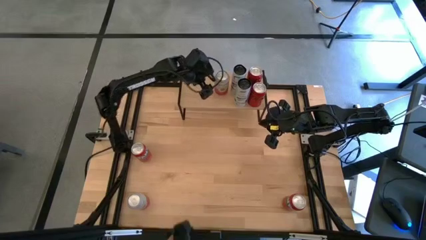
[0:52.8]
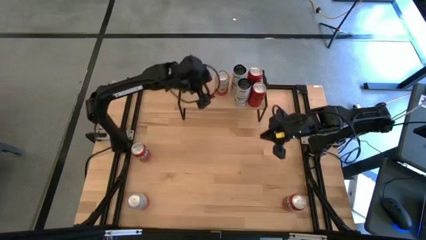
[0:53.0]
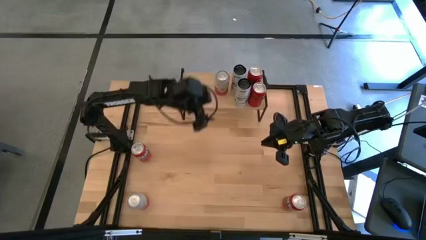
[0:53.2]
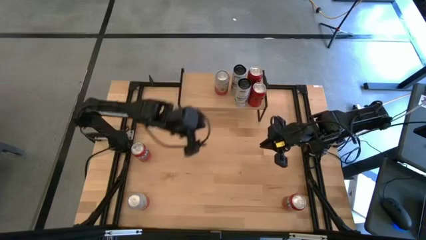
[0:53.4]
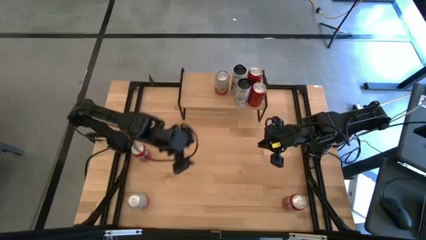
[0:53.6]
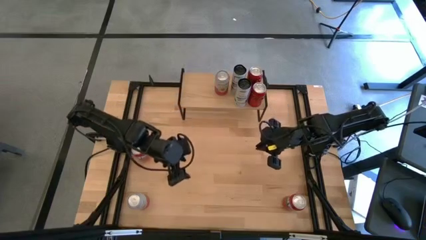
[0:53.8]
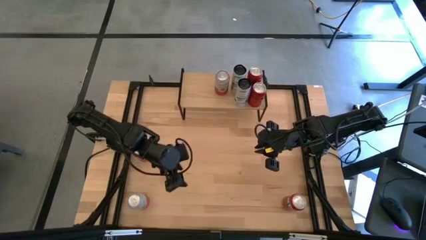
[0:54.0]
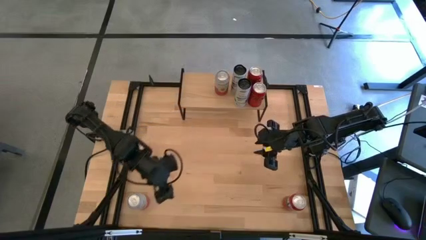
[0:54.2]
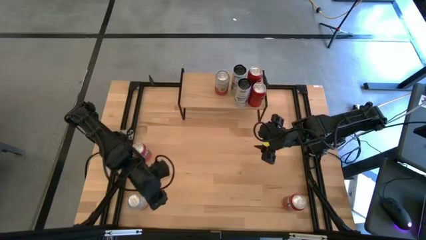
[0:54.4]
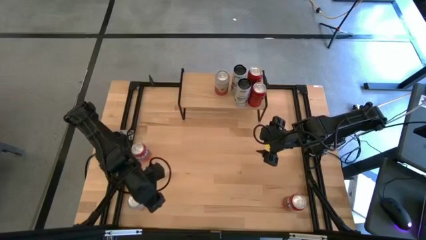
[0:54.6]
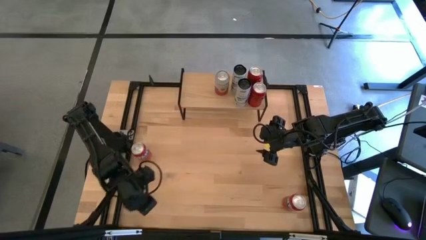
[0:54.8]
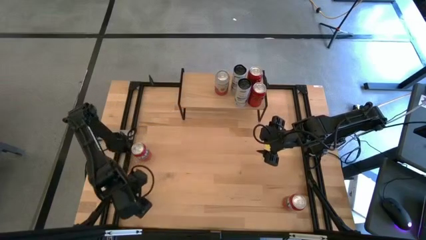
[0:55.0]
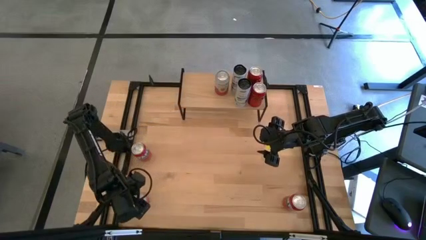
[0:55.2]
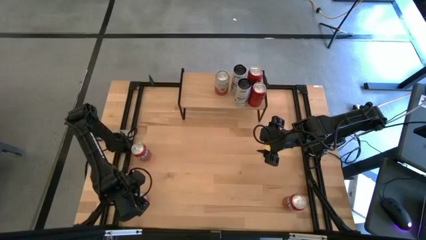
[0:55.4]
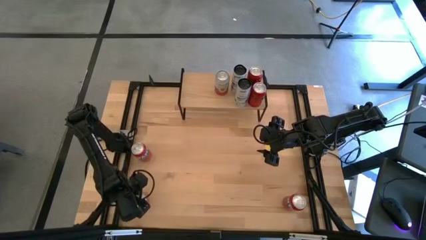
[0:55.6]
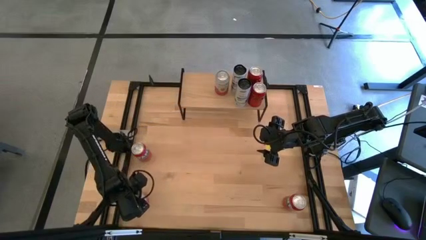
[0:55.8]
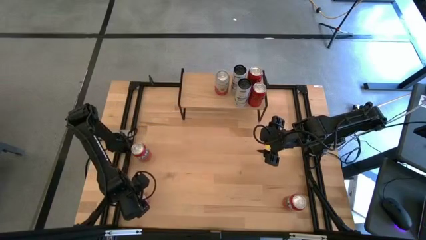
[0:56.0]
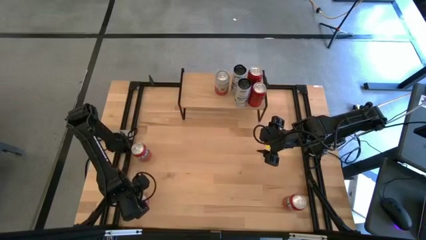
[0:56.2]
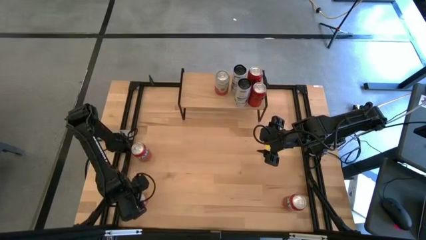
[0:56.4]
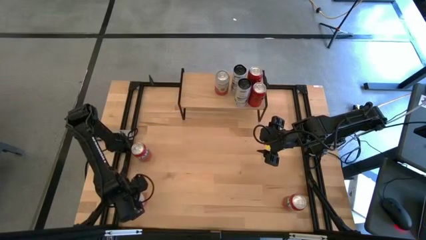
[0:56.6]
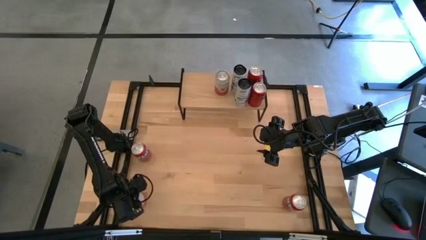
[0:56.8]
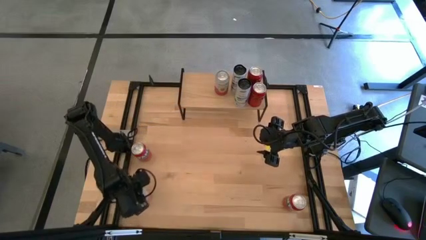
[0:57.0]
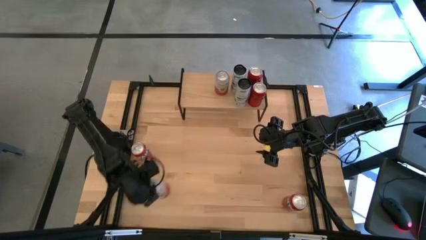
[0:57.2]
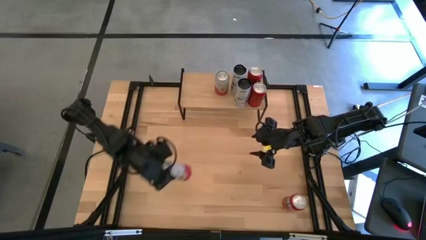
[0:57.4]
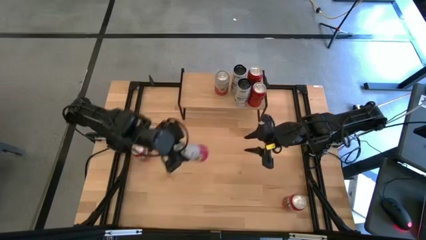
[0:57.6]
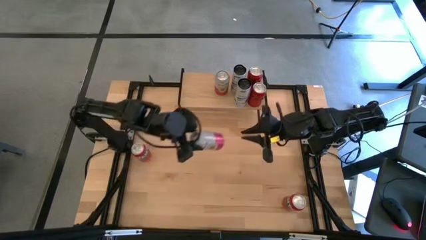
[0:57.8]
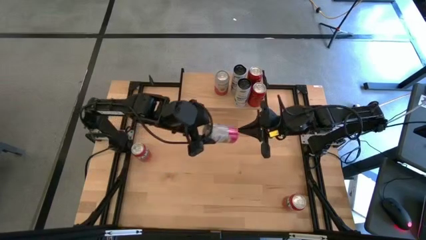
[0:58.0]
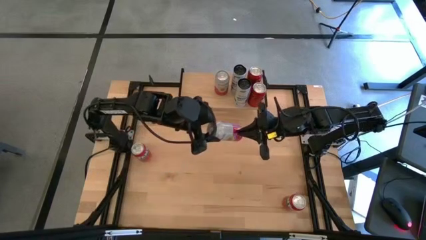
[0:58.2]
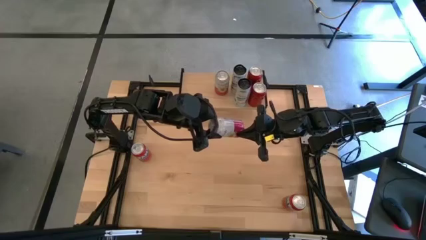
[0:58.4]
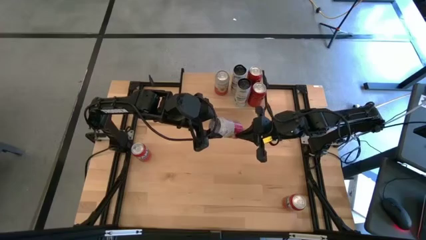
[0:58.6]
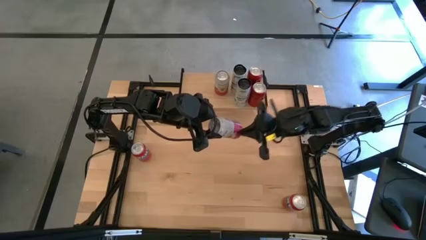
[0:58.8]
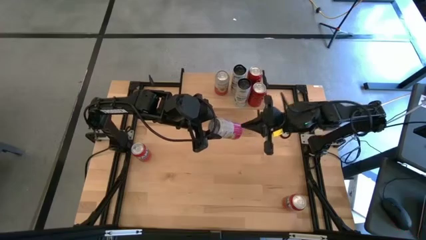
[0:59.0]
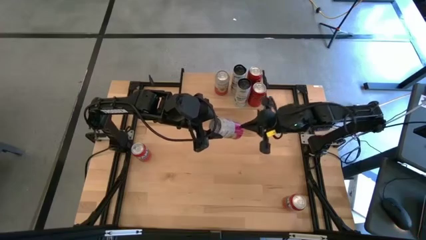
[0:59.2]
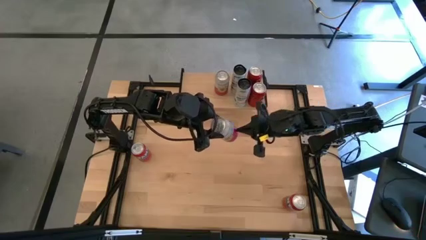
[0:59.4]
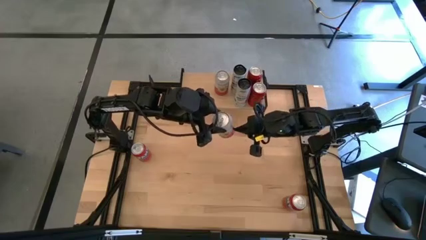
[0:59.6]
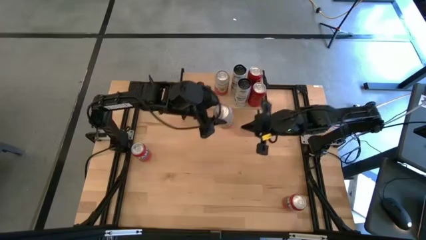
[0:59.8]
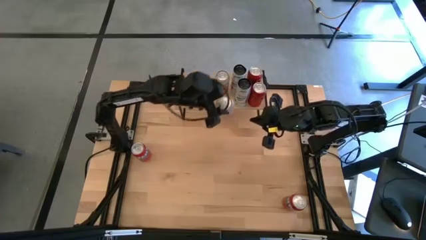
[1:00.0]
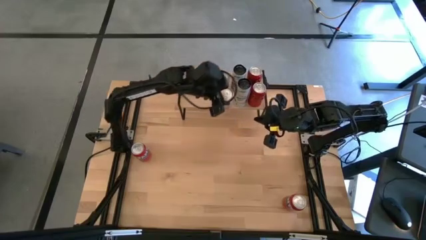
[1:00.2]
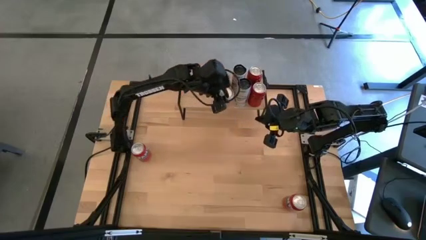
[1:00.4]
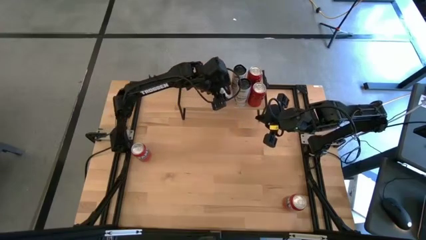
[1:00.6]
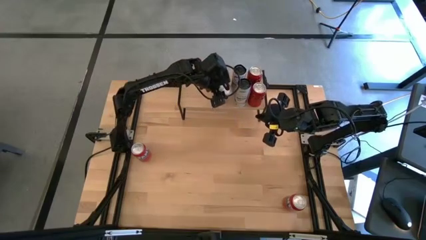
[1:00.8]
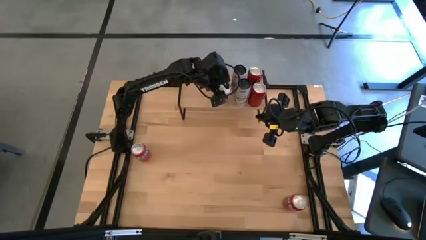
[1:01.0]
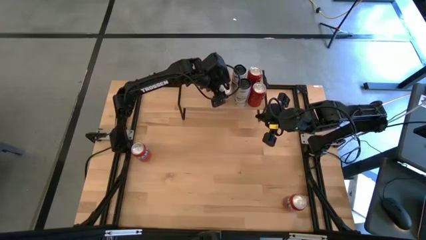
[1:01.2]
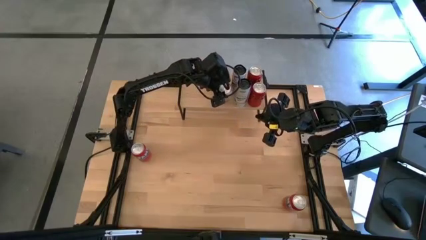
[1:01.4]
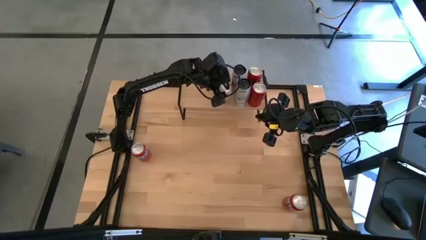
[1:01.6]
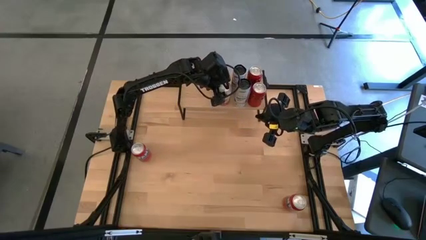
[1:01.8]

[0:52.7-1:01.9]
Task: Place canned beverage on shelf
Put the pink and white soda can aligned with the other pink and white soda can on the shelf

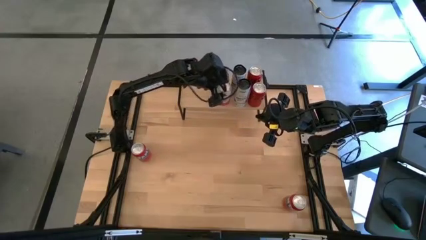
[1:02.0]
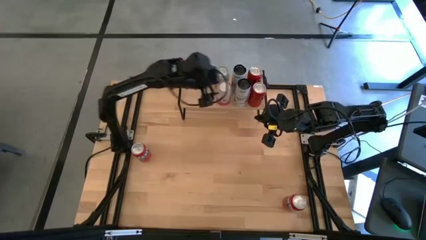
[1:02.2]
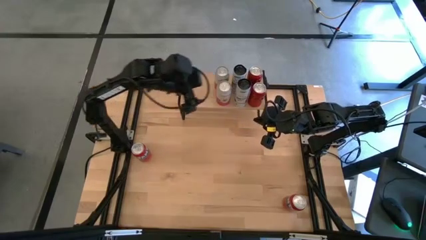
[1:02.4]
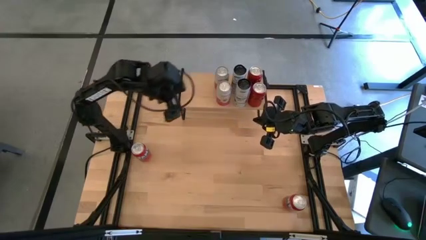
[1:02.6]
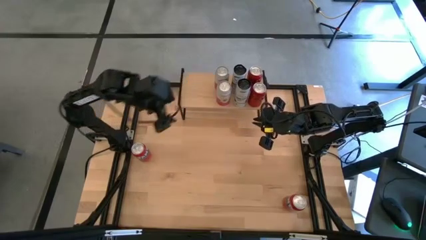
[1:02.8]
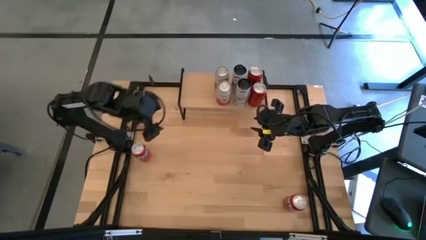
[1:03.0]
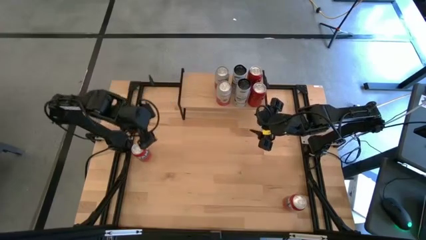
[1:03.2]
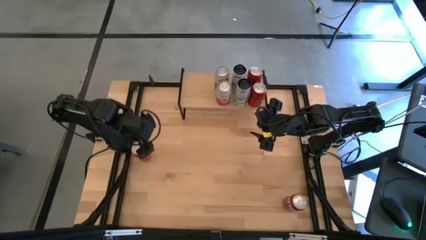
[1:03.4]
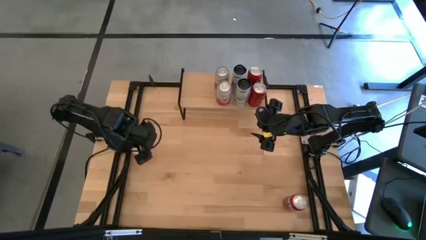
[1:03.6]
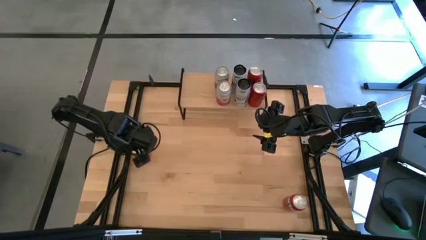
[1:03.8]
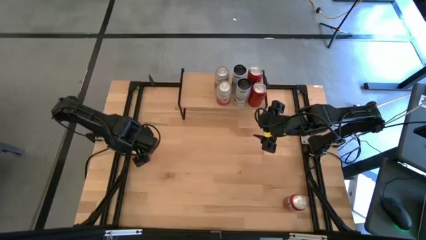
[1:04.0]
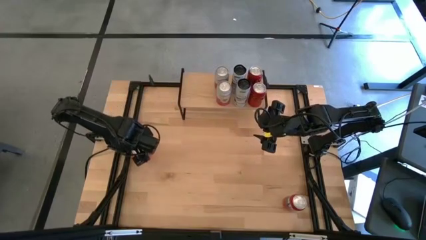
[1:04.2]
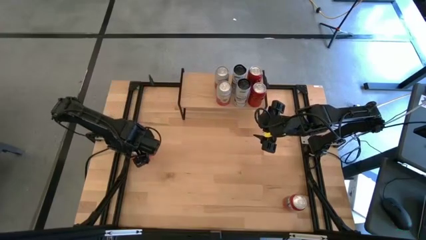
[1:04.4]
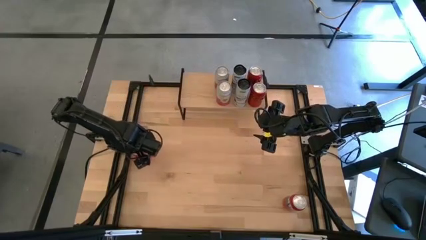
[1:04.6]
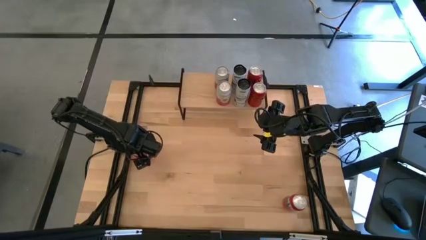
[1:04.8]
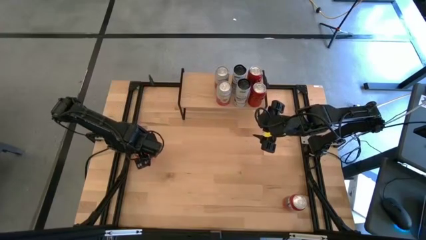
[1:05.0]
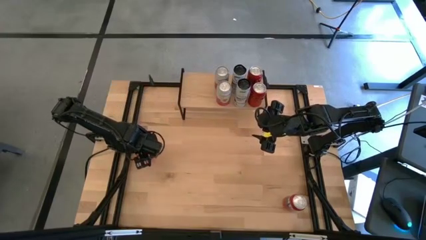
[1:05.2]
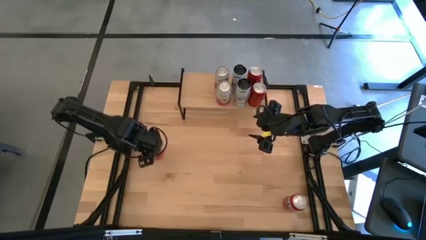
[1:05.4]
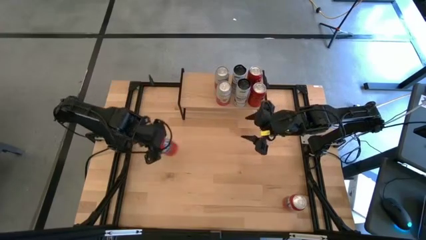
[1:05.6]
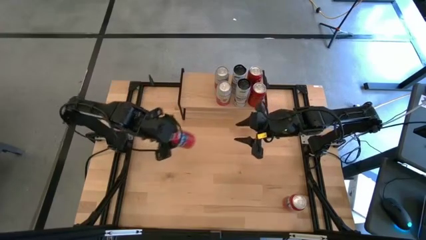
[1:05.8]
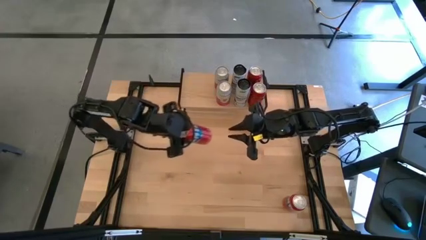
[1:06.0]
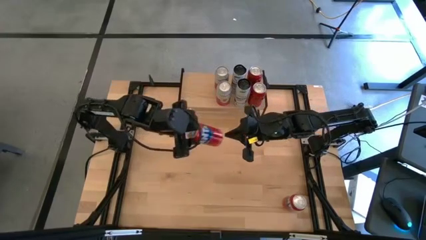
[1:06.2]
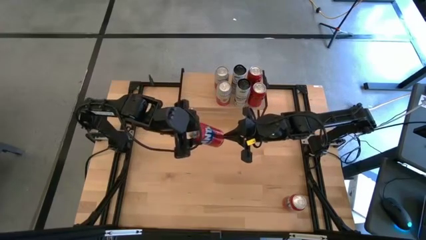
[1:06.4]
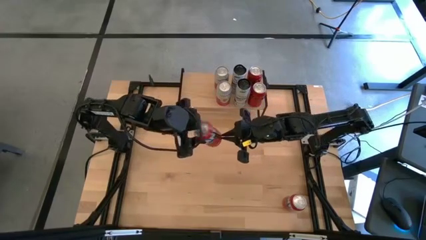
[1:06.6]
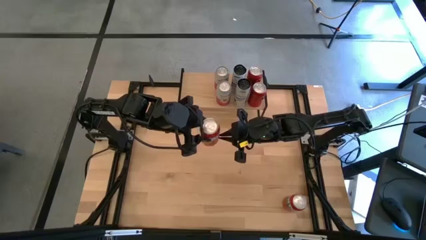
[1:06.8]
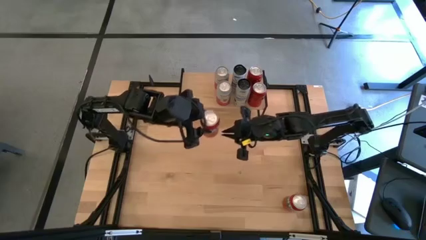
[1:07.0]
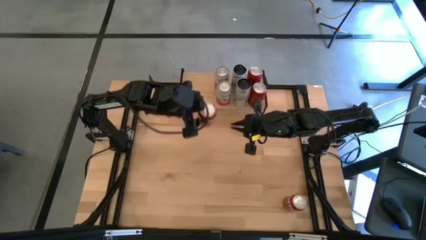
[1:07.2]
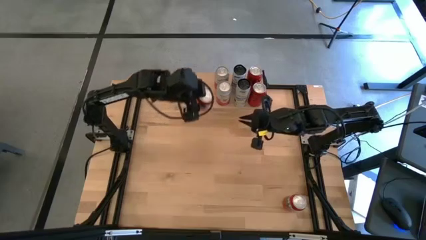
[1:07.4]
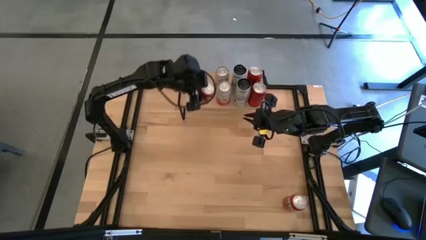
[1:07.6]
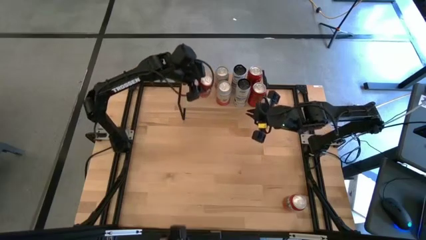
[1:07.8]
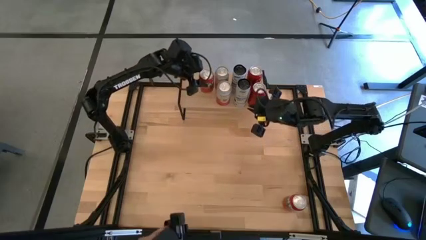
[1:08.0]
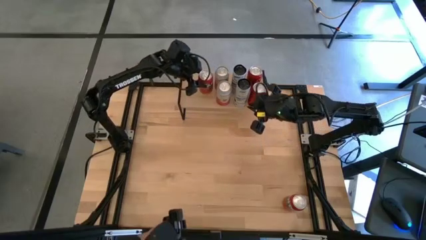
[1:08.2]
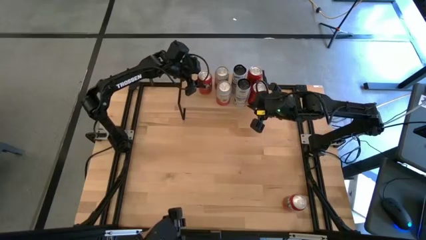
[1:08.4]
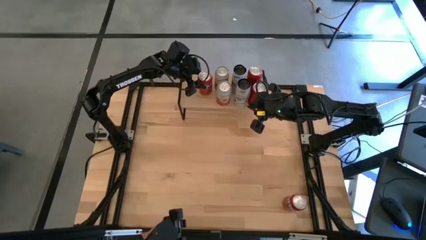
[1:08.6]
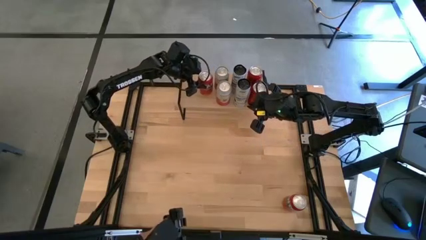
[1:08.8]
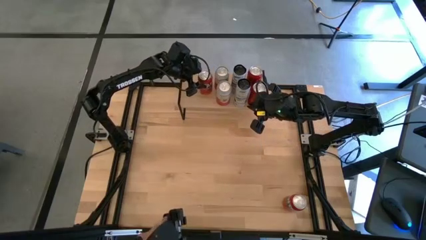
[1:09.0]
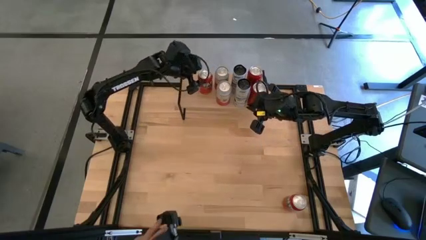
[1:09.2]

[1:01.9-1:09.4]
Put the left orange soda can on the shelf
